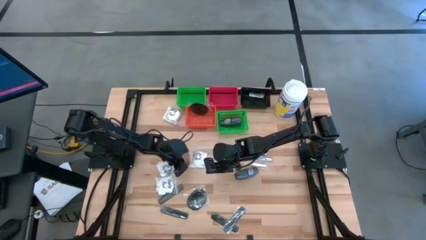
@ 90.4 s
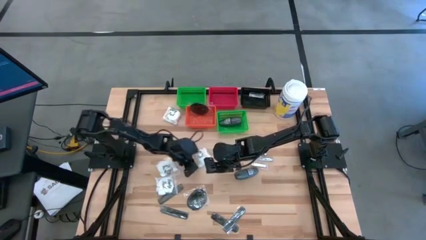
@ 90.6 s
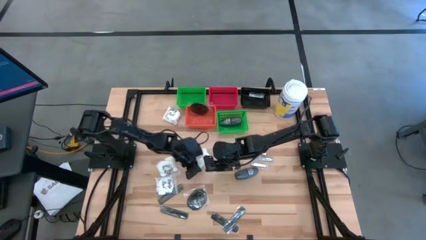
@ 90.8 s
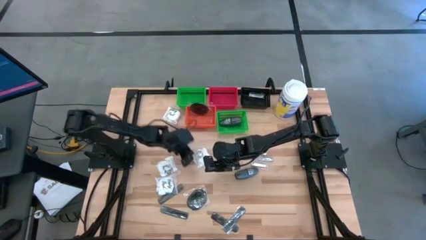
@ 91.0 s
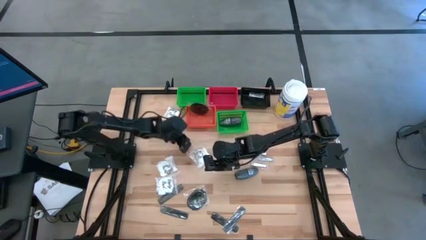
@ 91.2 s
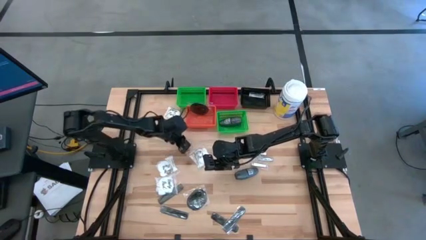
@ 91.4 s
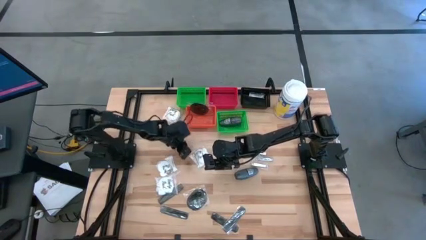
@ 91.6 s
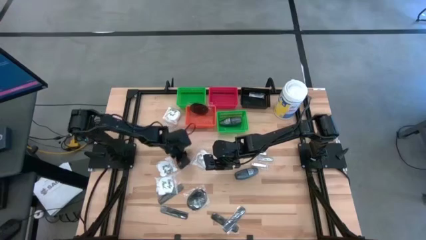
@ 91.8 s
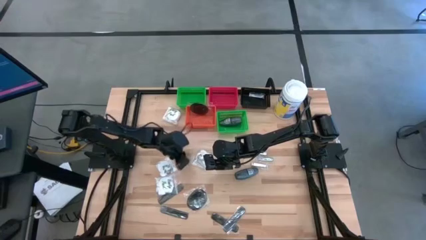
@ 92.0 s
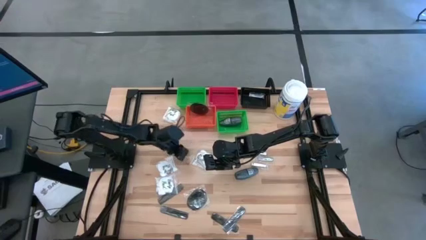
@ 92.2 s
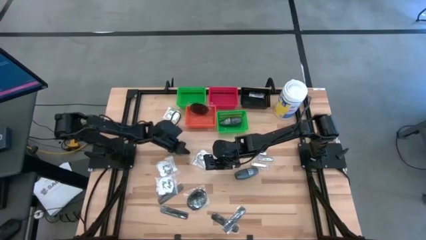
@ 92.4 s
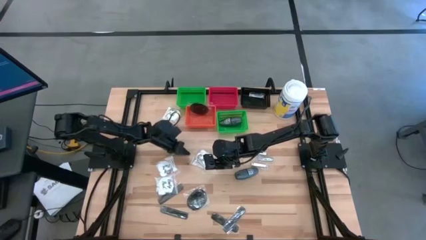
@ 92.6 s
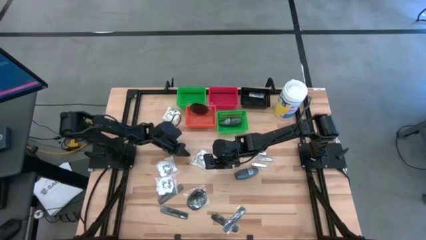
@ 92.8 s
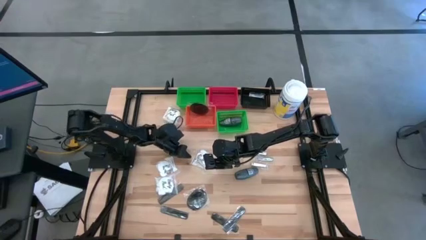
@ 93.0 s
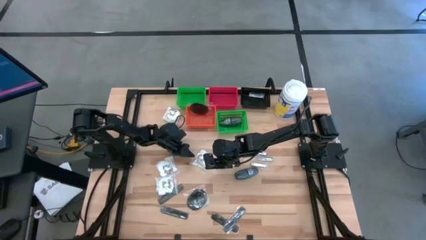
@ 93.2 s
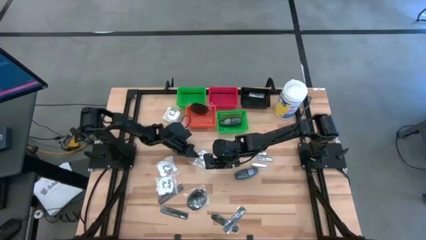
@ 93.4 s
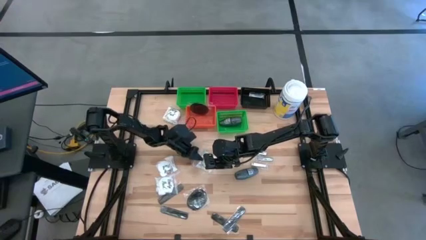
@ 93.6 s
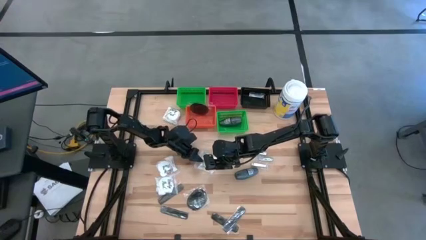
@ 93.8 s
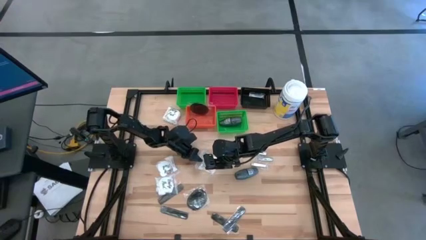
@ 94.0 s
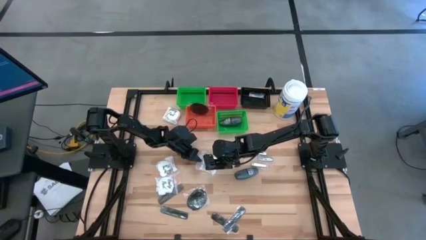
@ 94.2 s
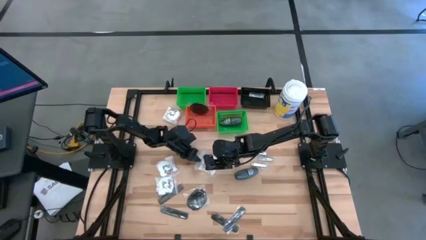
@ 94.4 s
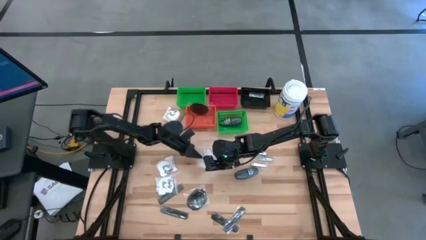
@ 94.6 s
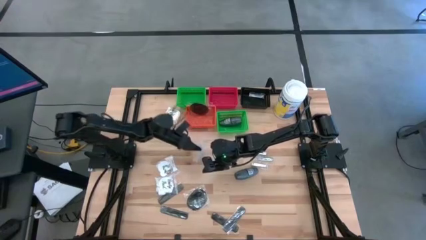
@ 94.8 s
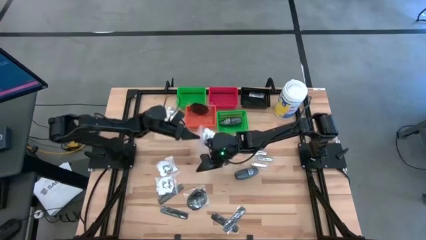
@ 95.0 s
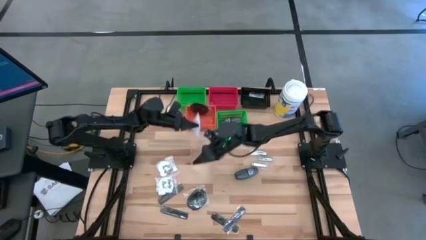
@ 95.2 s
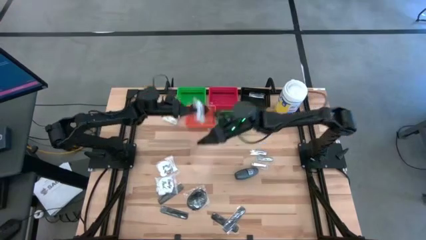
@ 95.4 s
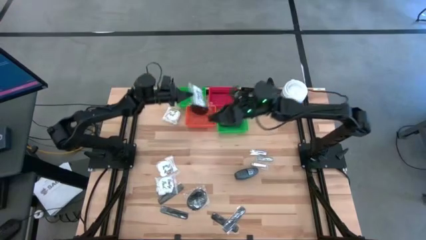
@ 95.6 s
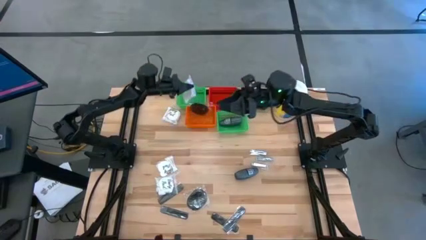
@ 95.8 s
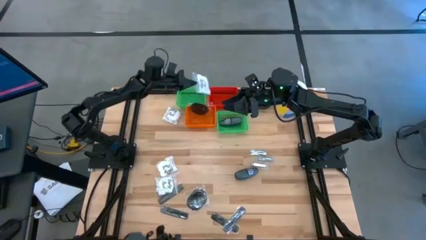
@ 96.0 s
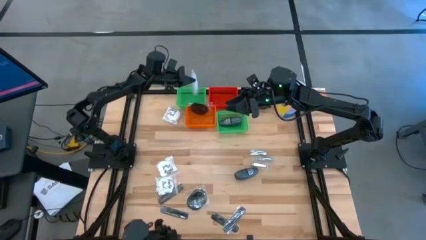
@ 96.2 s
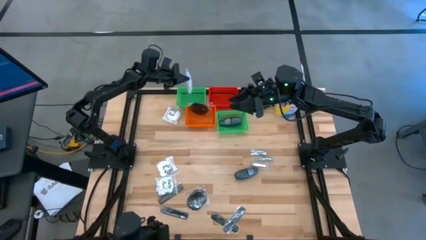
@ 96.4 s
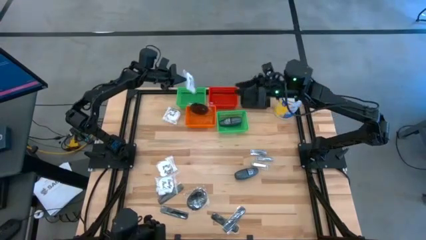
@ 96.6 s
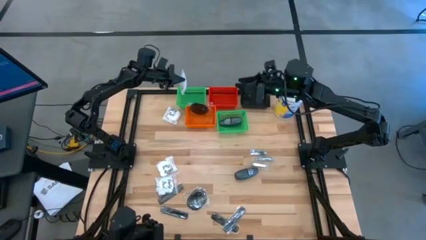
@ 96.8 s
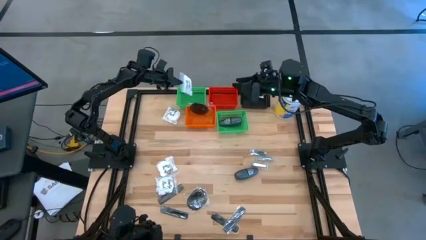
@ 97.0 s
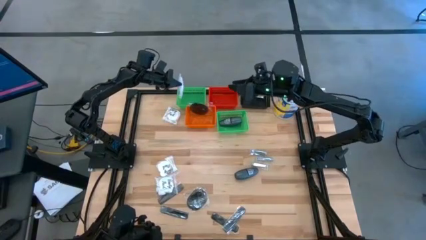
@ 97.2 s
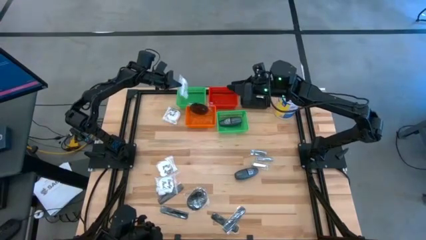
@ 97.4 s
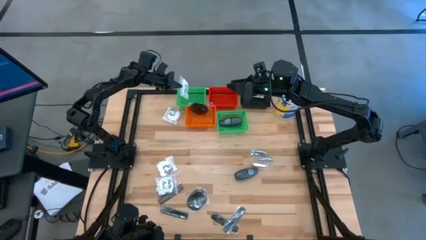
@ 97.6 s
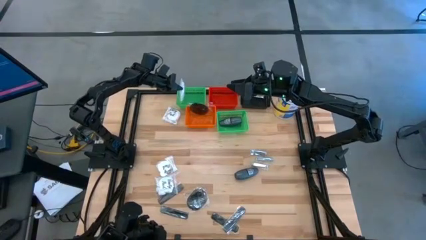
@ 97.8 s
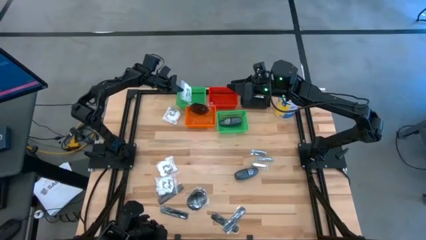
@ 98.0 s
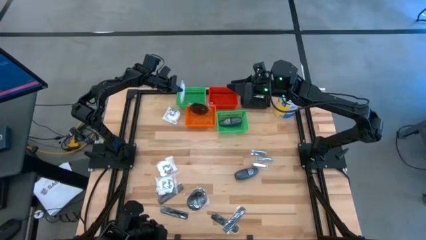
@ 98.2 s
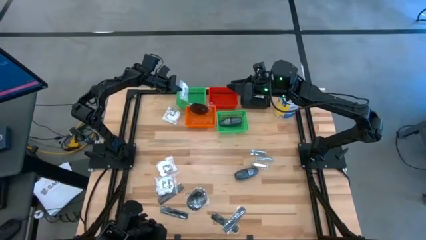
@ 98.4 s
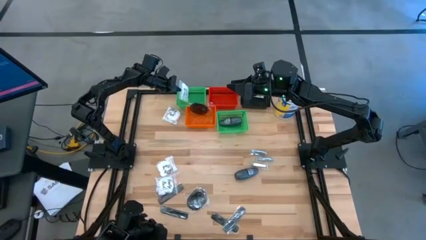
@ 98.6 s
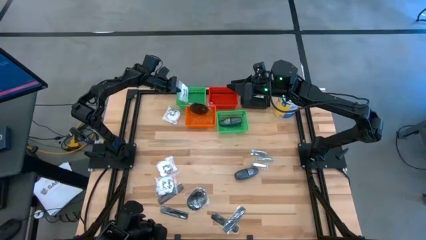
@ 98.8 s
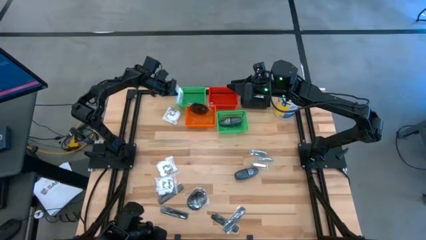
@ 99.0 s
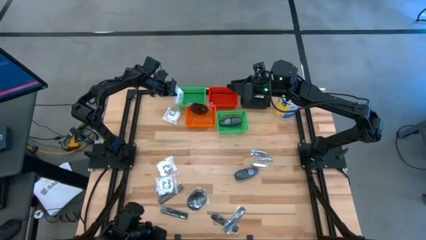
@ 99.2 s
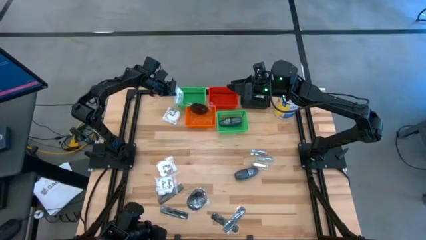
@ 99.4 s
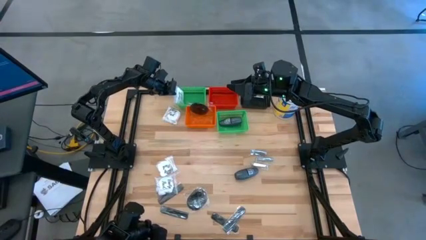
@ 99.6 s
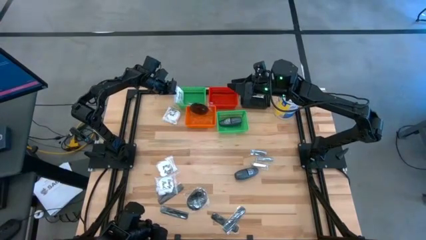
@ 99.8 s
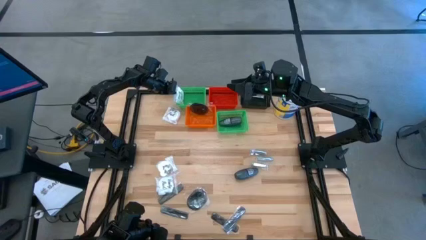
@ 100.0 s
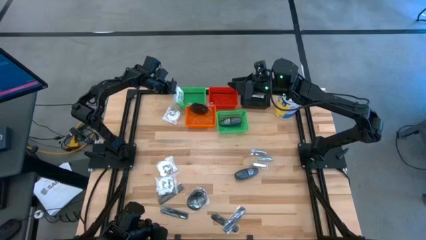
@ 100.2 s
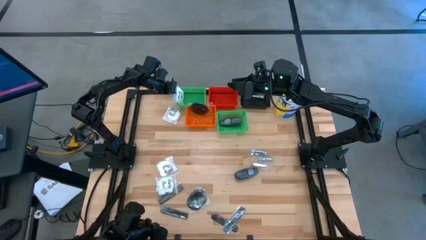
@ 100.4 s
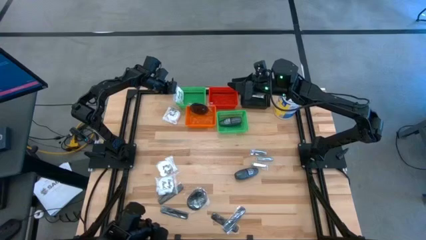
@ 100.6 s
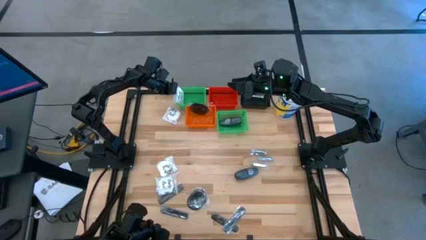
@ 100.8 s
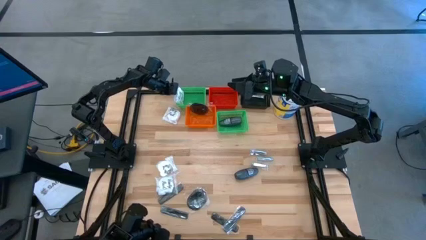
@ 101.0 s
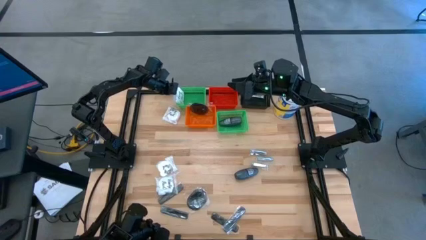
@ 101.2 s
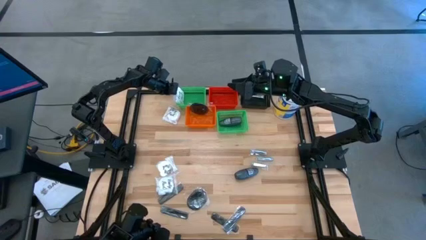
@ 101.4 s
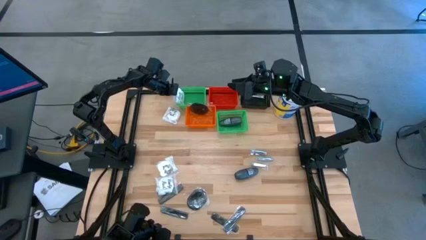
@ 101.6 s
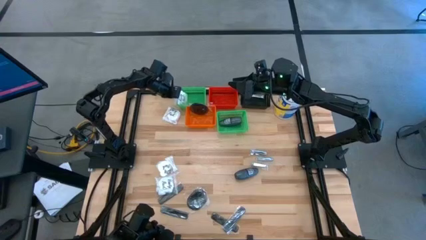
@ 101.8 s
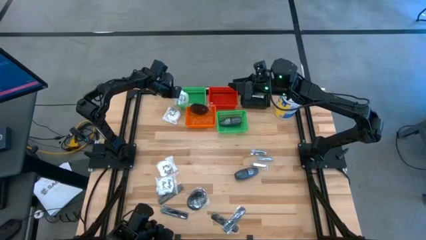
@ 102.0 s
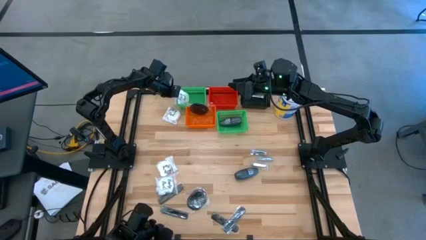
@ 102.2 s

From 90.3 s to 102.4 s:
Task: Pick & Place Travel size toiletries
Put the vanity pack into the green bin

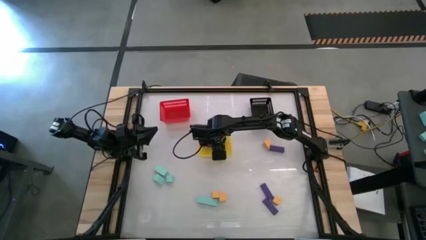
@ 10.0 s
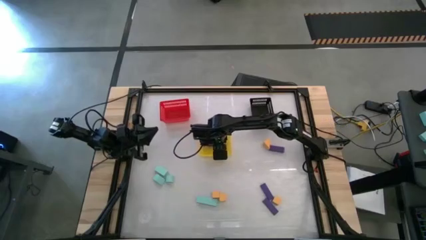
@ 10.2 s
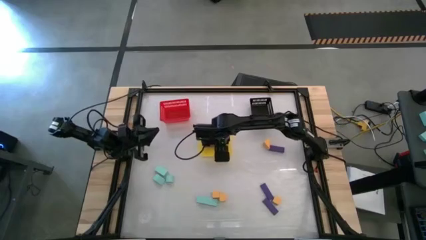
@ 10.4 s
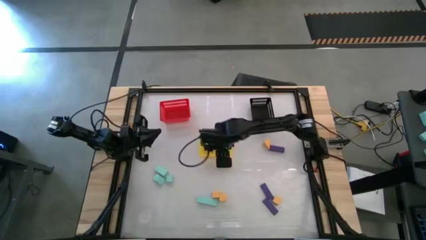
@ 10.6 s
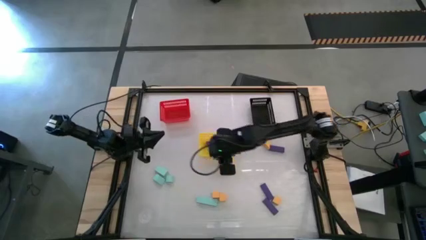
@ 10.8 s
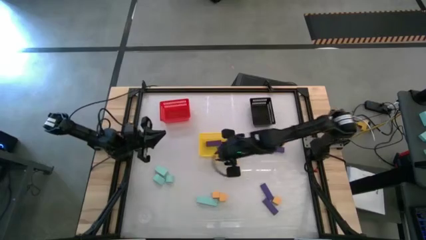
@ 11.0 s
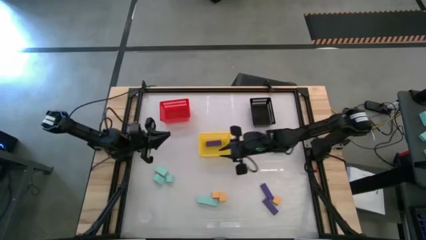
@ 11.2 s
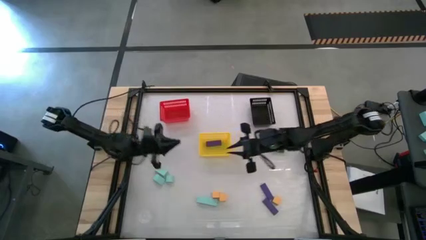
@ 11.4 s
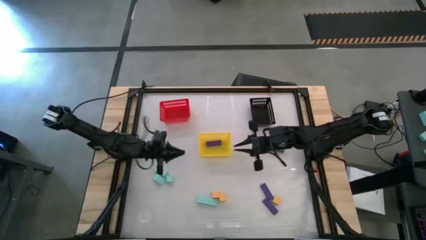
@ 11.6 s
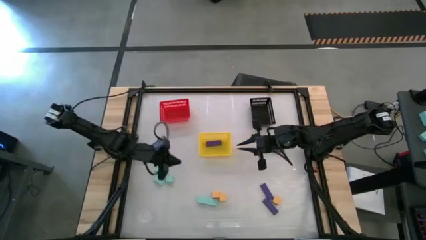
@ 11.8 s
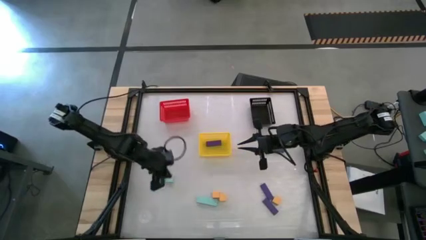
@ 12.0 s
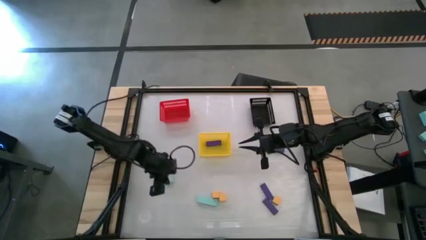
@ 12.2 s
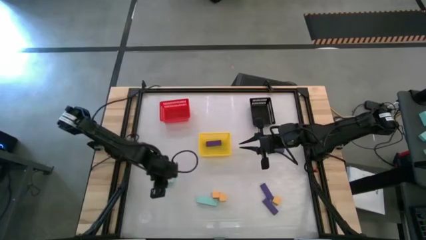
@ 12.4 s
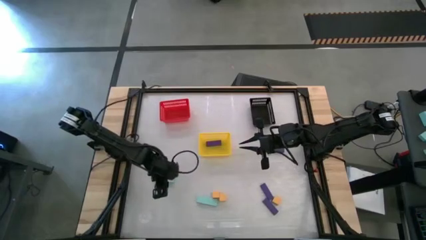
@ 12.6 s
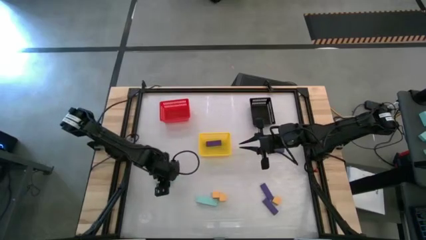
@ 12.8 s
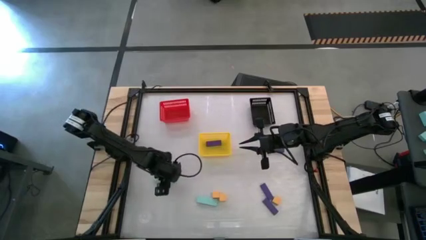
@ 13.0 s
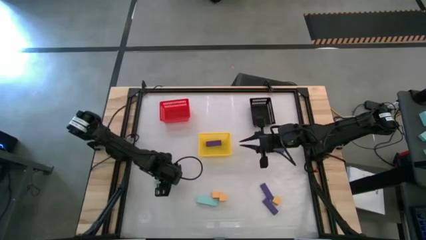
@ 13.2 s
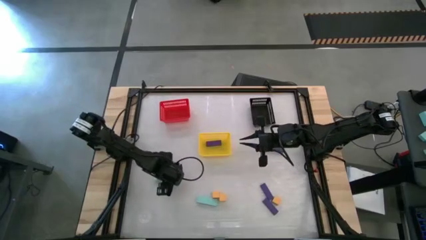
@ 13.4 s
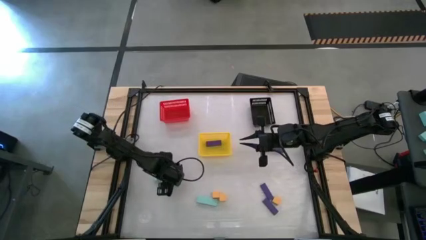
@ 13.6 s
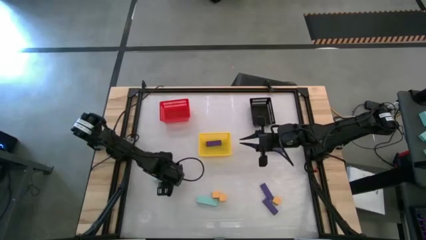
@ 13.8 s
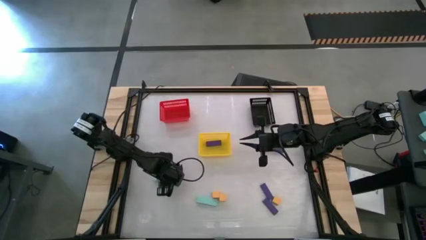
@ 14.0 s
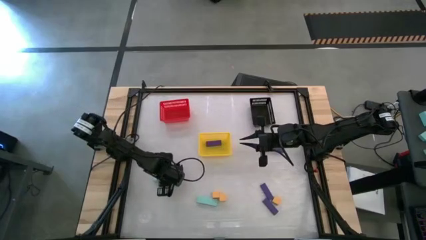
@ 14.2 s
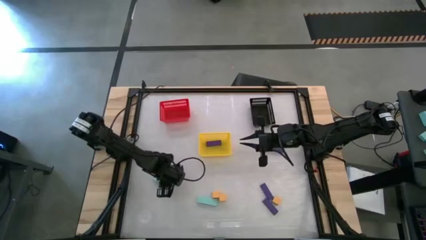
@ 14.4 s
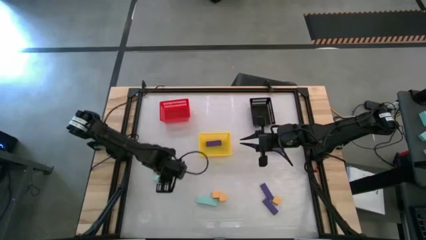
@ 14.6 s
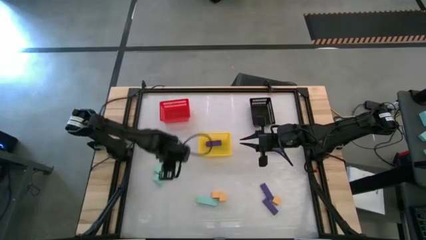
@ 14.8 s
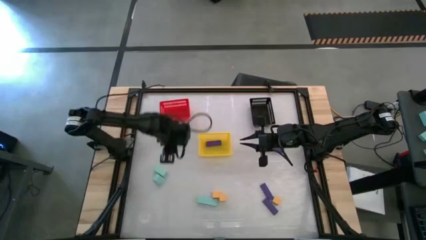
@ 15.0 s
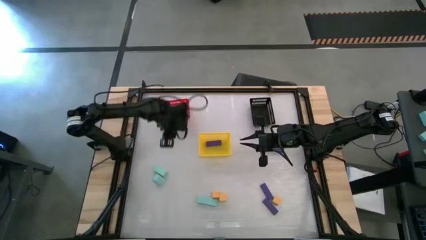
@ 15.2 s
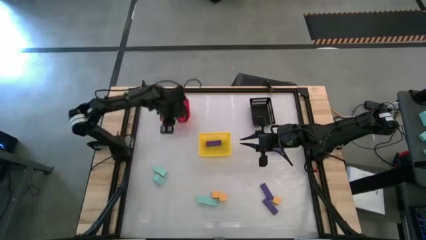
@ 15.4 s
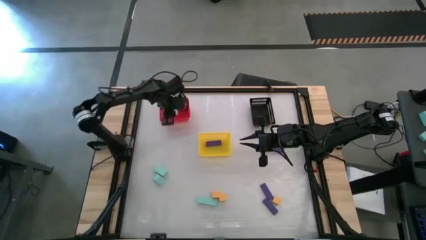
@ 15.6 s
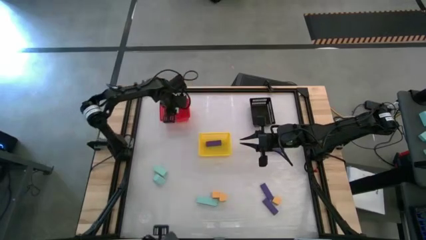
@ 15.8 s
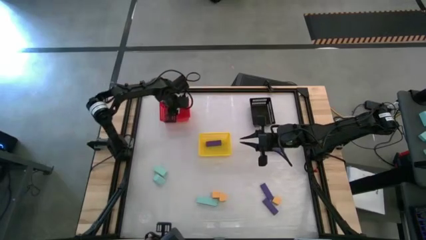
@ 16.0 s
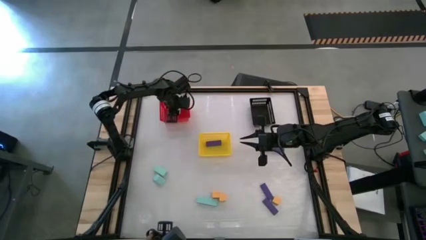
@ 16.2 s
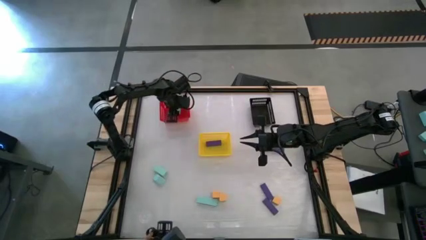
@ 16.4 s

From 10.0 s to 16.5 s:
Task: Sort & place blocks by color
Put the light blue block into the red bin
